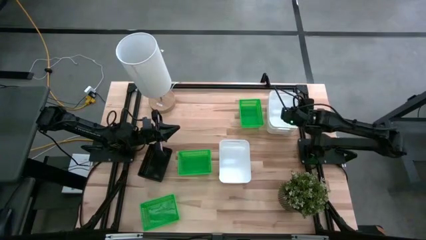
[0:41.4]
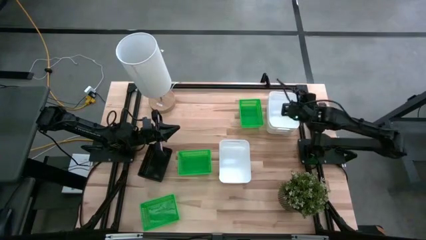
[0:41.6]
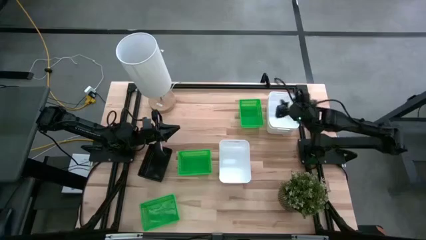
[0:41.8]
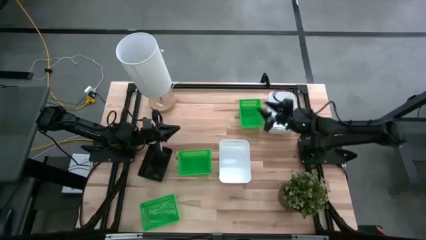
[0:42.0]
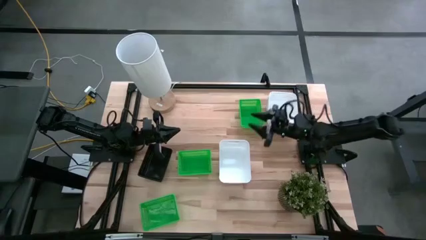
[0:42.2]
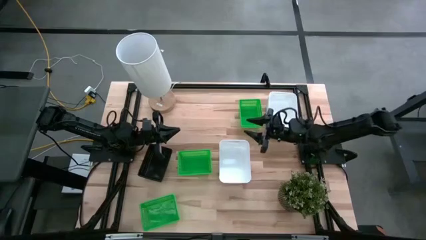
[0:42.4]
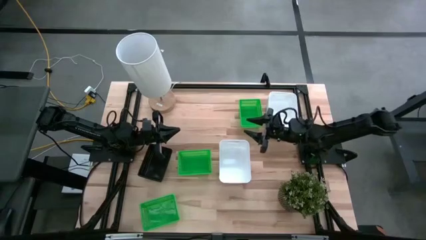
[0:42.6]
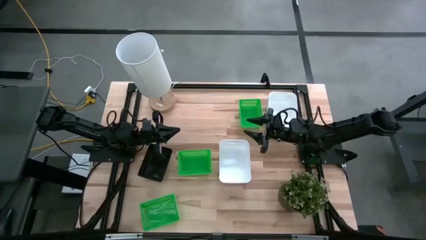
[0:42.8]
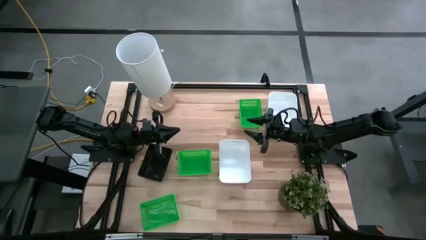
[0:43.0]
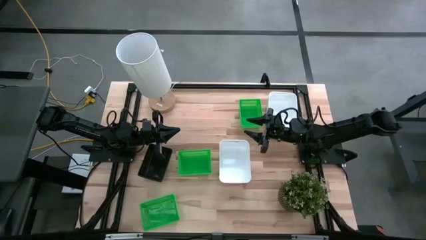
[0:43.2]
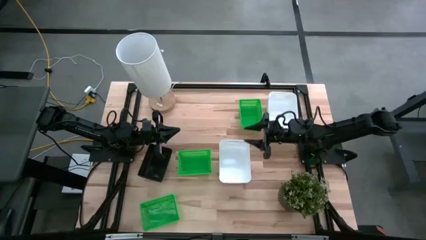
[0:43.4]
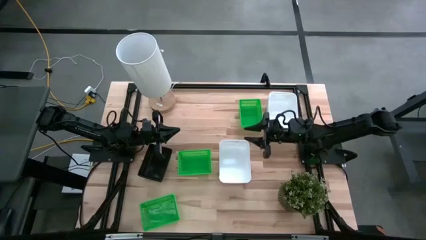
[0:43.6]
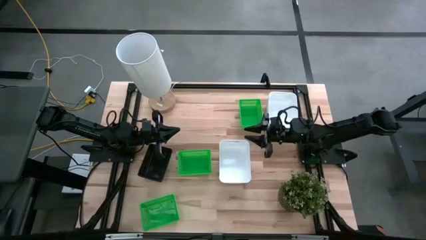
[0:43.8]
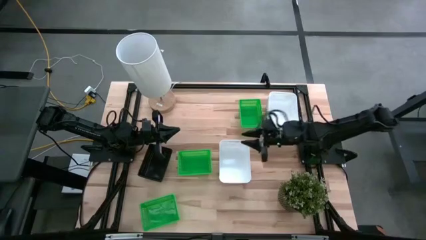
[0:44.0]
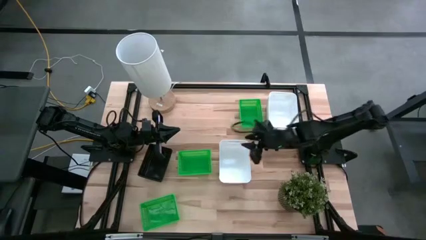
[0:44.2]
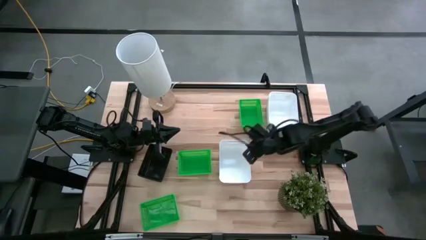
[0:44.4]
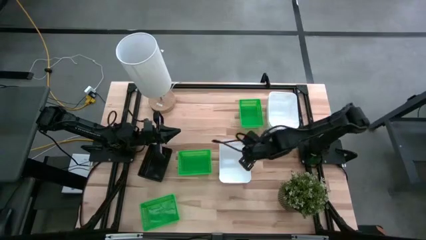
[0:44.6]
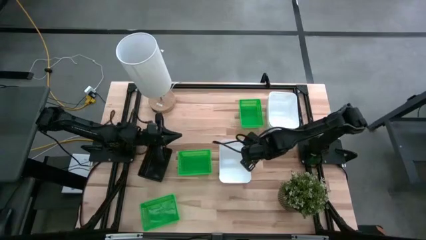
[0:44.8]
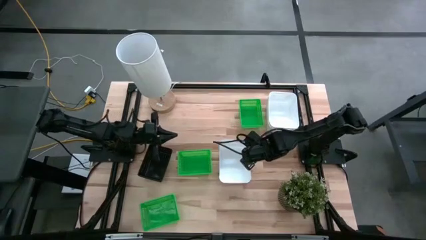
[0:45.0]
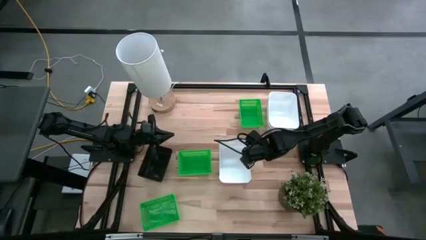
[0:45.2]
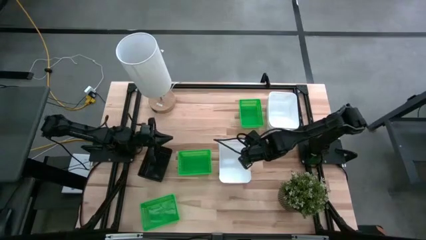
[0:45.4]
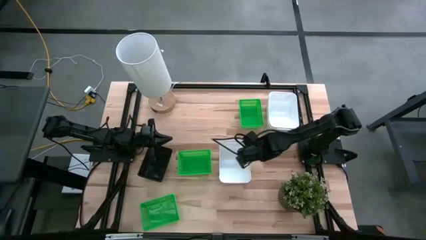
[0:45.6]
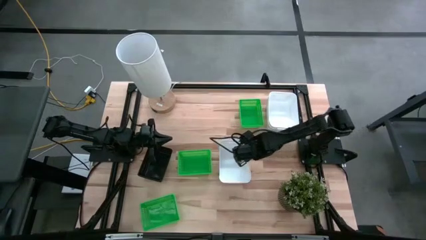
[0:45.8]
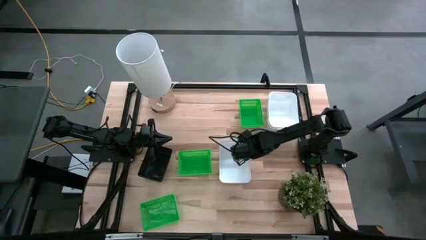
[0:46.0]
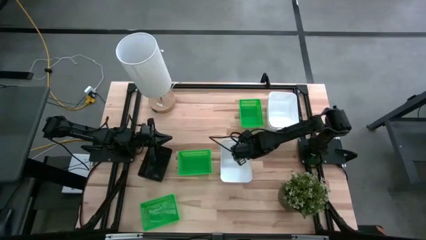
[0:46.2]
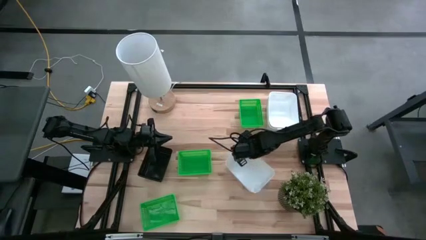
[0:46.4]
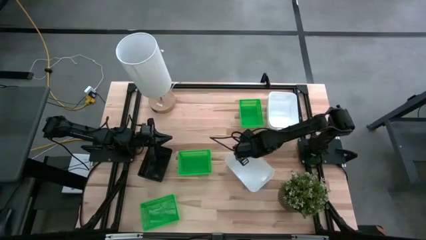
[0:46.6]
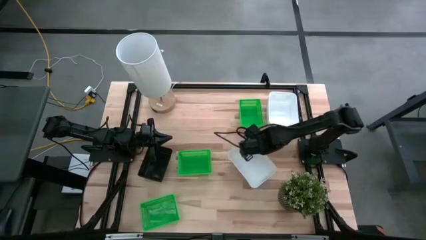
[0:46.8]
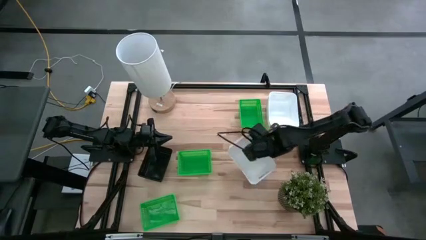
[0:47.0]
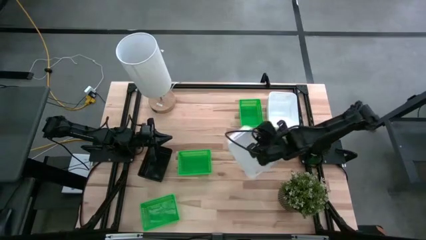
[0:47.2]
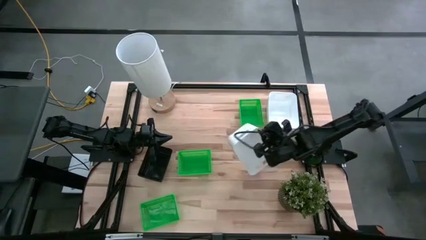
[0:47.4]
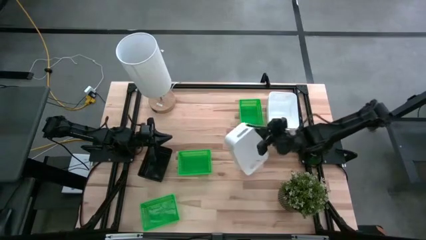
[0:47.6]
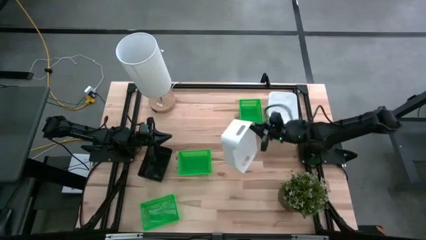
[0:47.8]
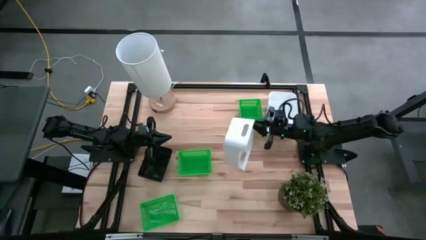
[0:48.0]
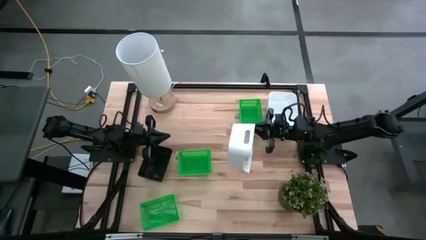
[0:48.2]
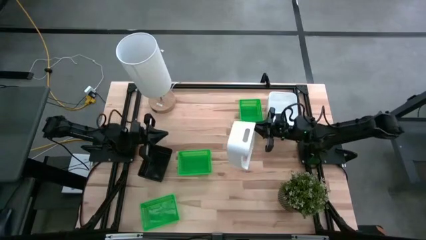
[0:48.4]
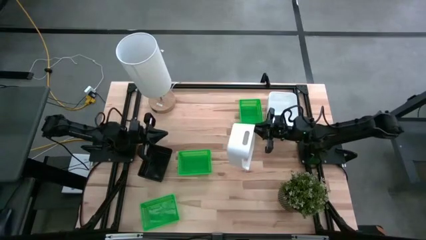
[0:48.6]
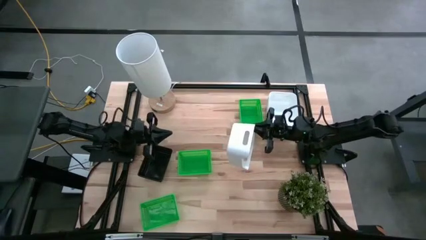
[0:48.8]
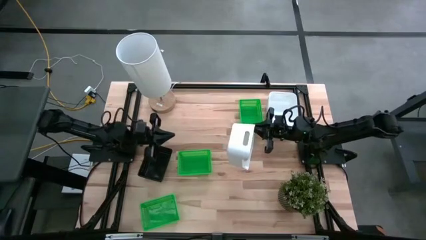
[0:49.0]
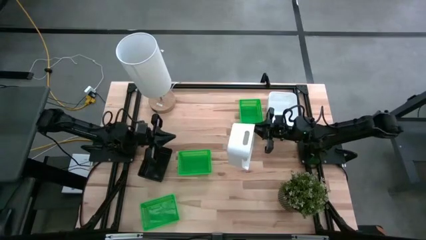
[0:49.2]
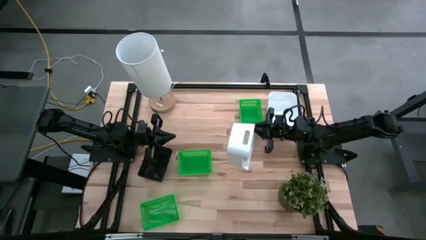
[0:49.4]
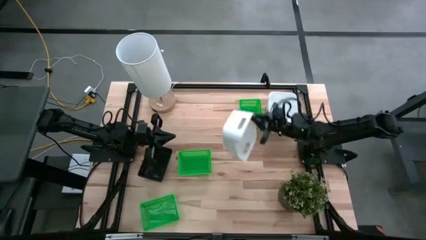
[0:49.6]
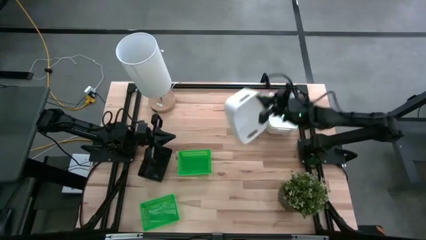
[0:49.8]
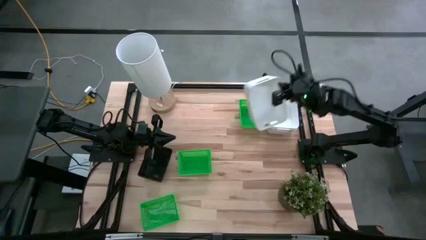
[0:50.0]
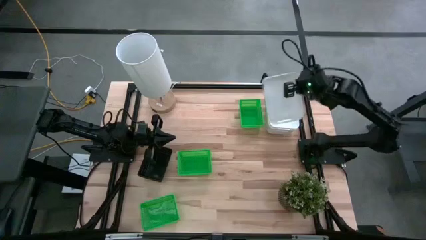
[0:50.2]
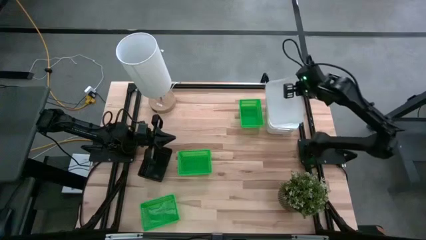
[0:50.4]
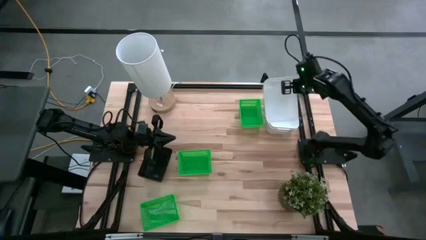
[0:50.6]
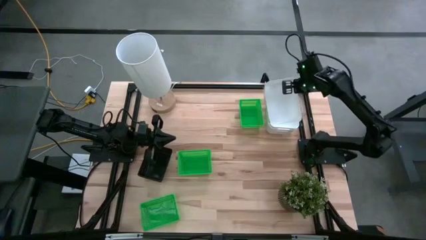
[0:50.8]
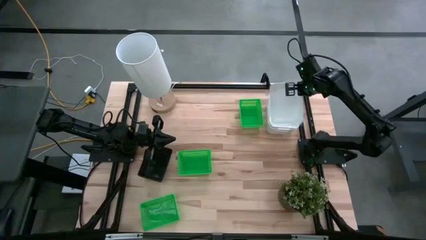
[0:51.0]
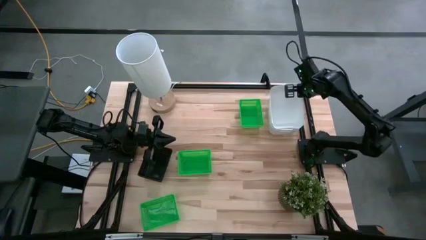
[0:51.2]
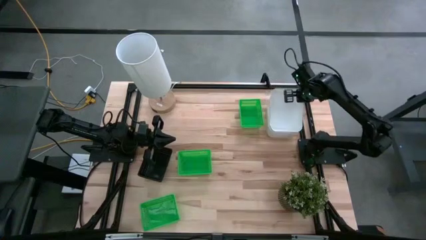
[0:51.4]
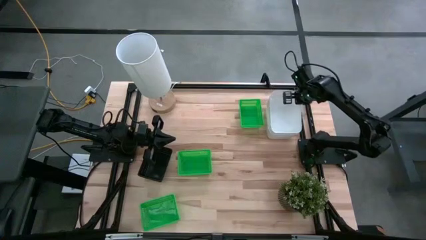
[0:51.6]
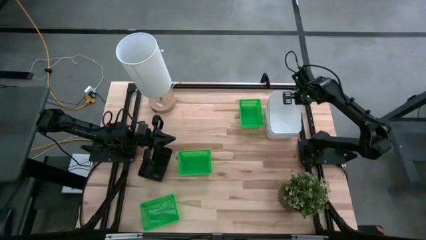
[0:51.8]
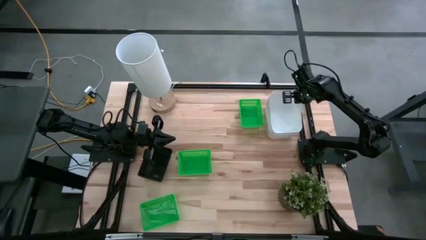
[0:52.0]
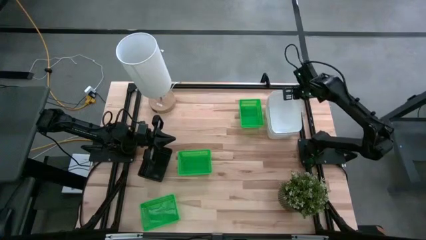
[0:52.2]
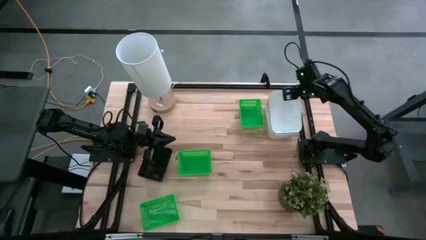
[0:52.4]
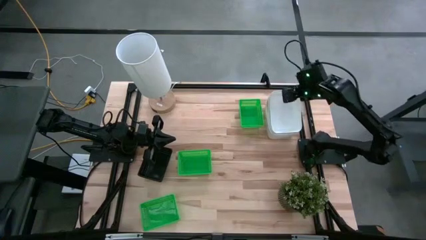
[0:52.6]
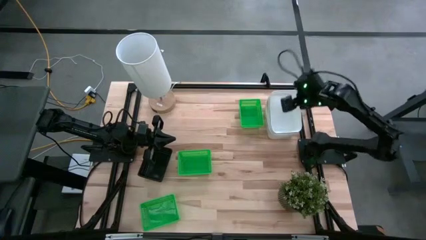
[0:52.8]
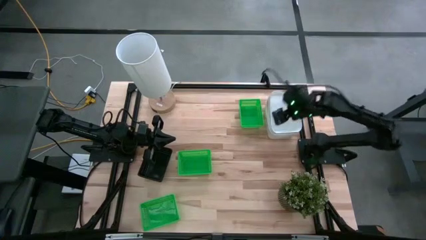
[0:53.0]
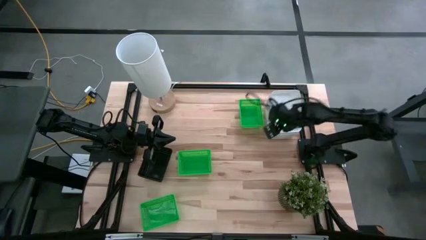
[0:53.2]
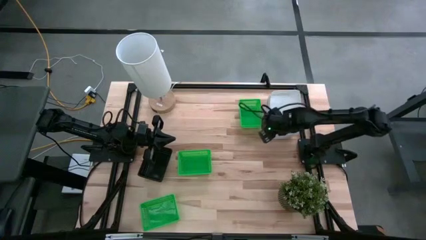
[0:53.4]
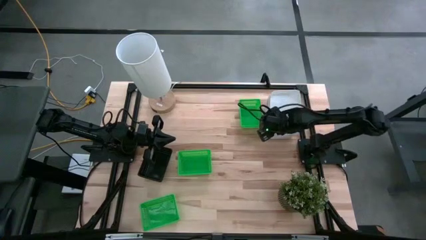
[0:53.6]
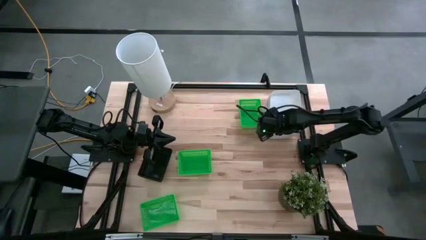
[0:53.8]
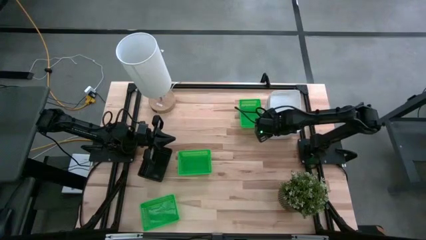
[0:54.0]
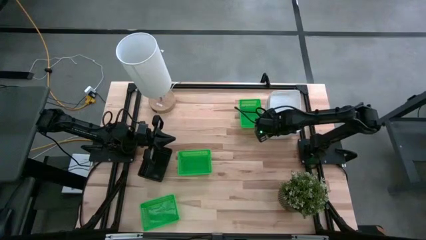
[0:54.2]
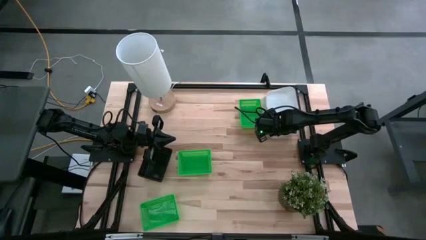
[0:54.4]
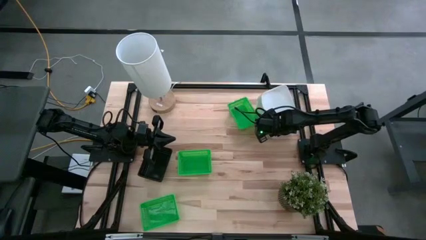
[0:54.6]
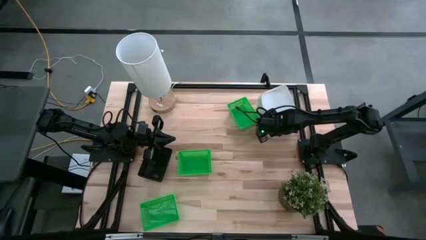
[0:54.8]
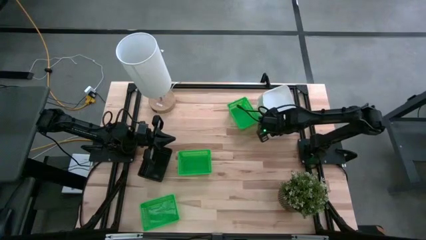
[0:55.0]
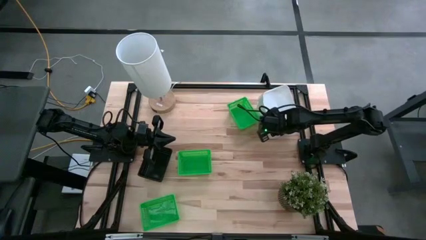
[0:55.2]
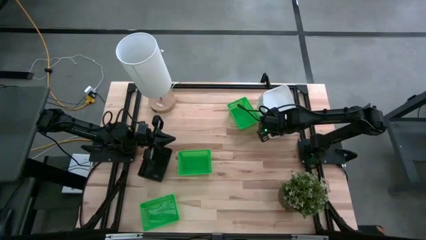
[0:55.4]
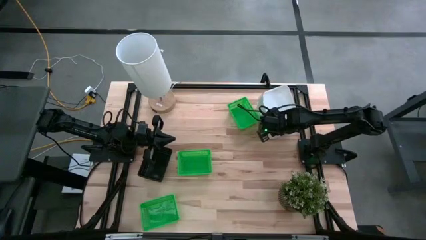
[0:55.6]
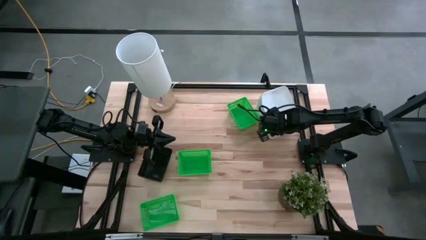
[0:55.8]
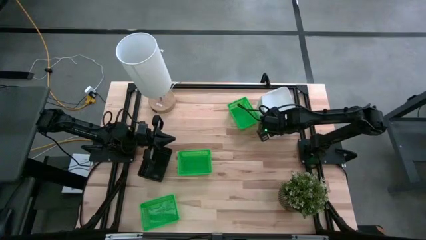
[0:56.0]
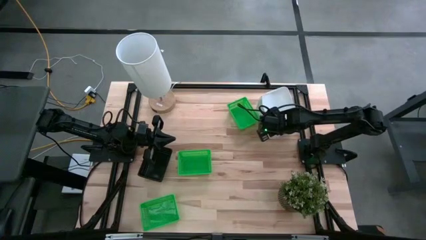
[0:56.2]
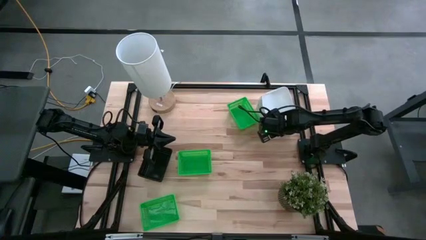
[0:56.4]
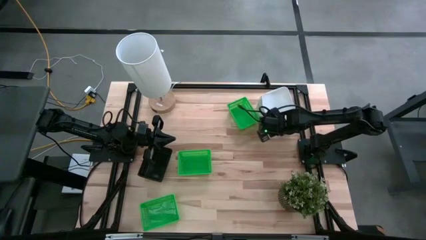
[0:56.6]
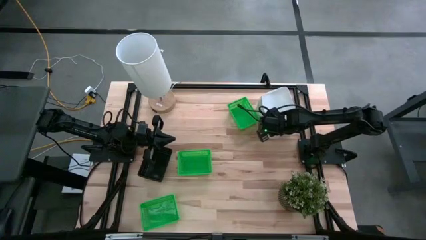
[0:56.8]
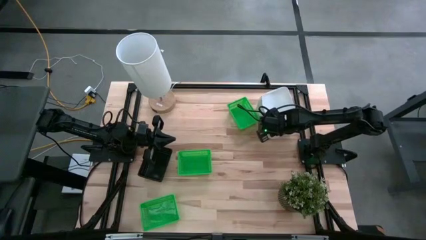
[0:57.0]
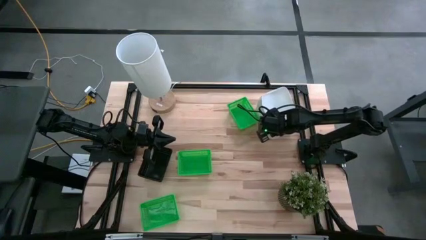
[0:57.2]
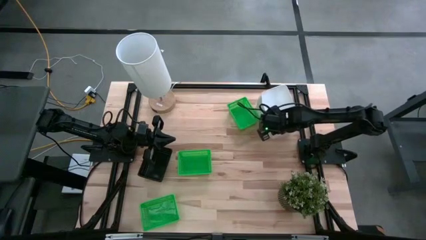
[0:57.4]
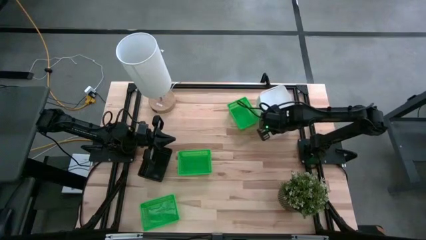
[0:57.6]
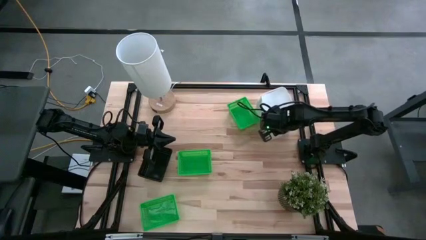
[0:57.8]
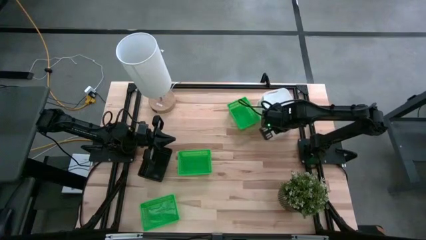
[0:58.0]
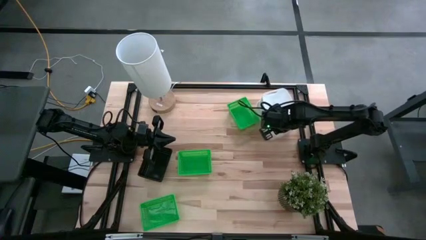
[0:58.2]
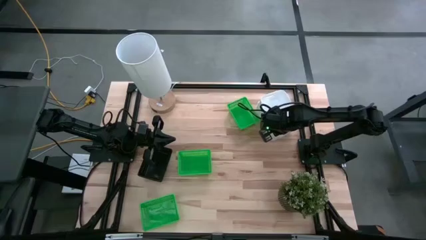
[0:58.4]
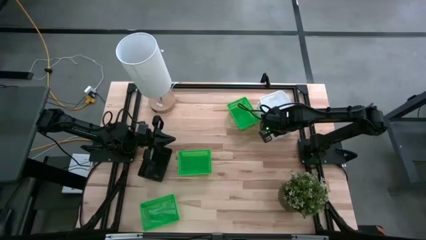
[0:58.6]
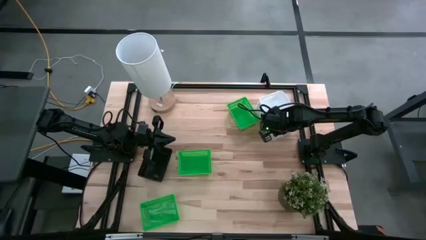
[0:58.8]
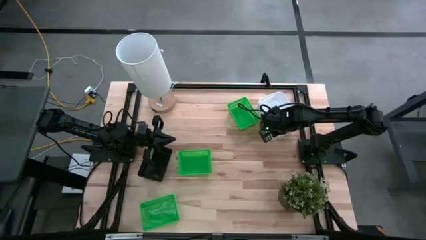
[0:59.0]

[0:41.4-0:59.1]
Stack the bottom white bin into the top stacked white bins
